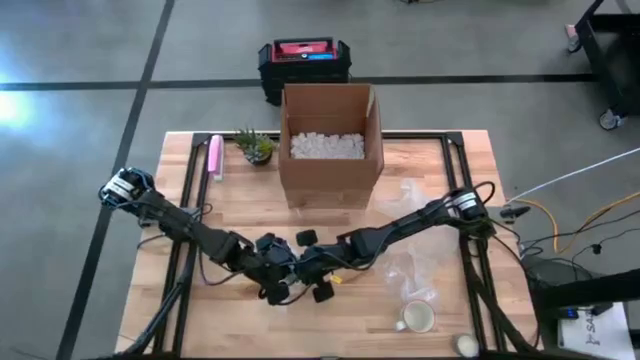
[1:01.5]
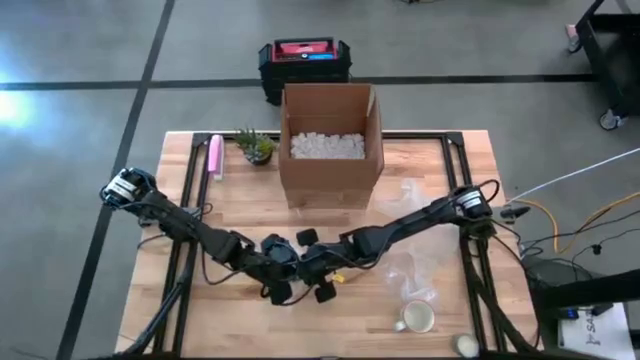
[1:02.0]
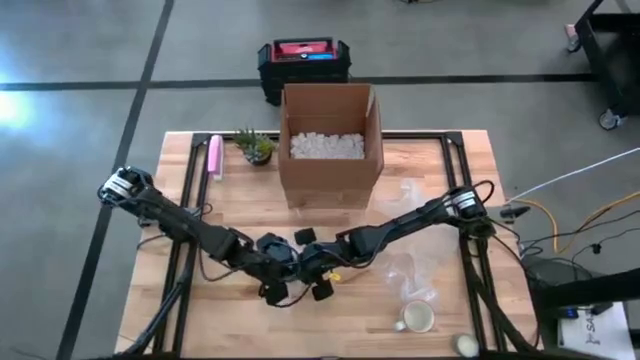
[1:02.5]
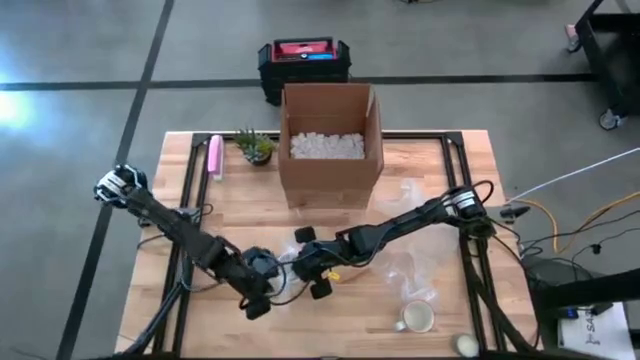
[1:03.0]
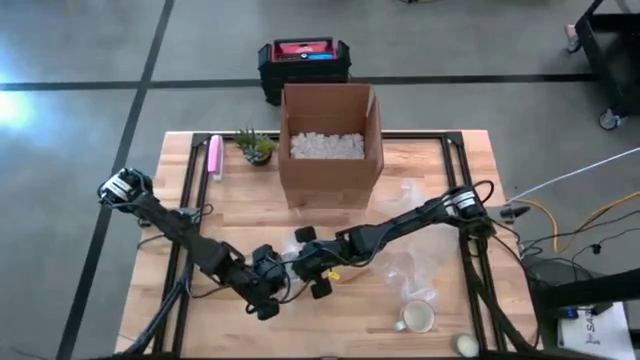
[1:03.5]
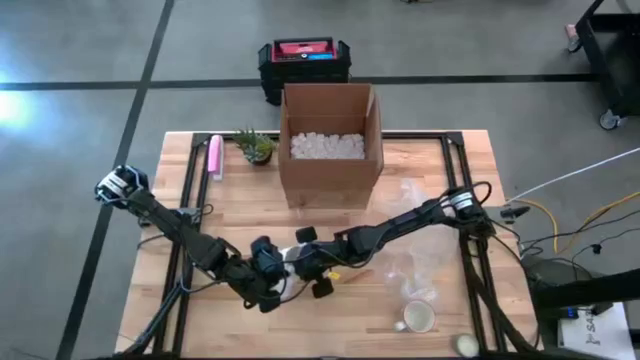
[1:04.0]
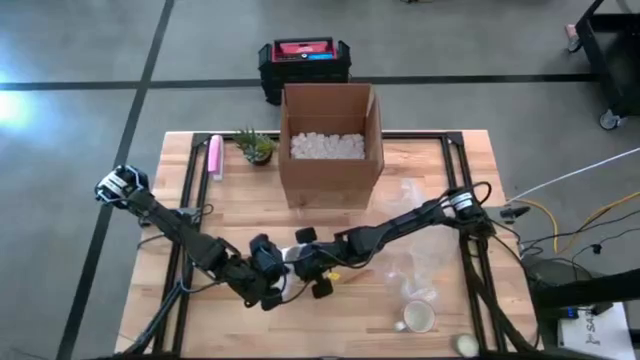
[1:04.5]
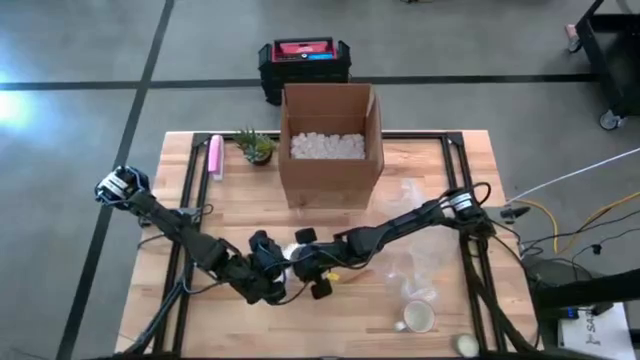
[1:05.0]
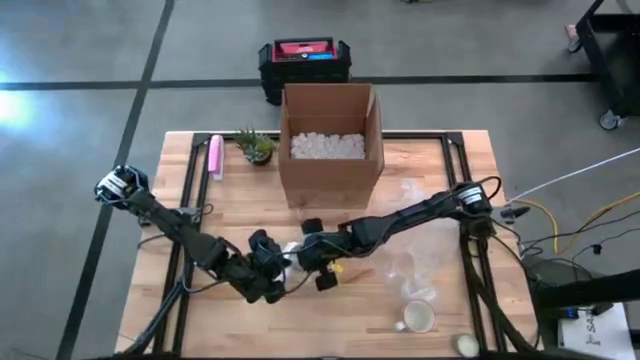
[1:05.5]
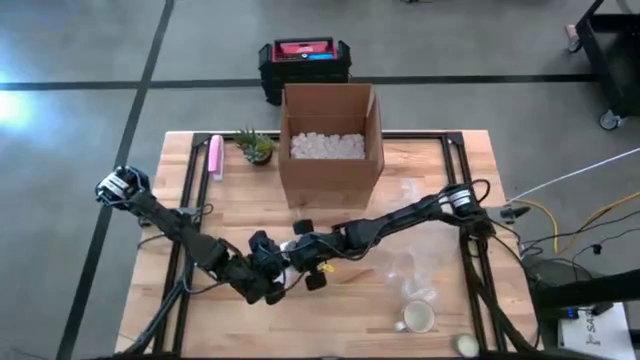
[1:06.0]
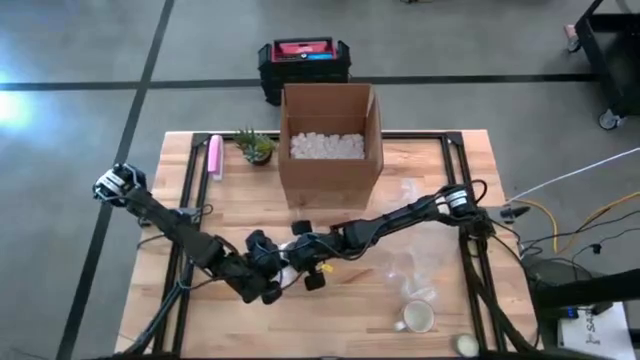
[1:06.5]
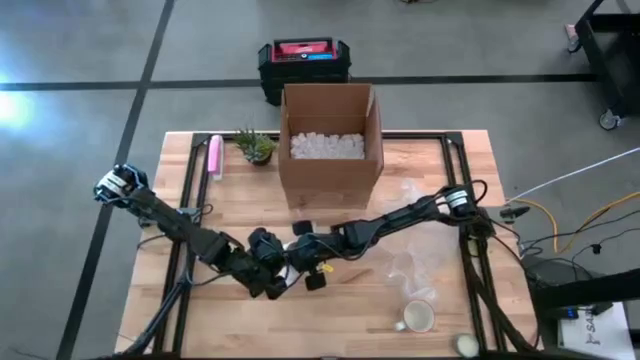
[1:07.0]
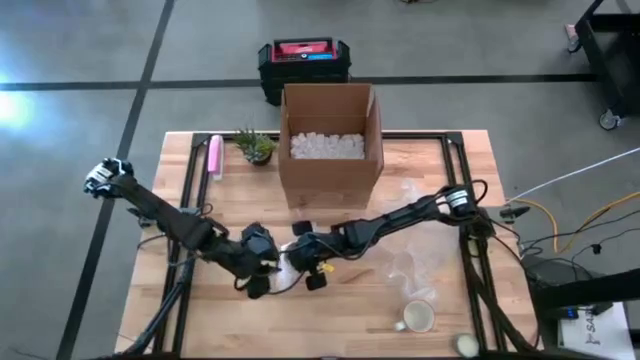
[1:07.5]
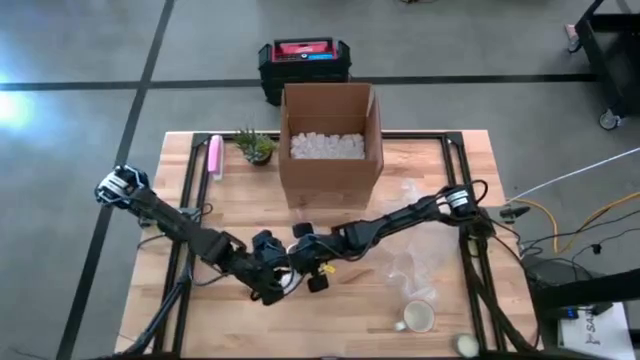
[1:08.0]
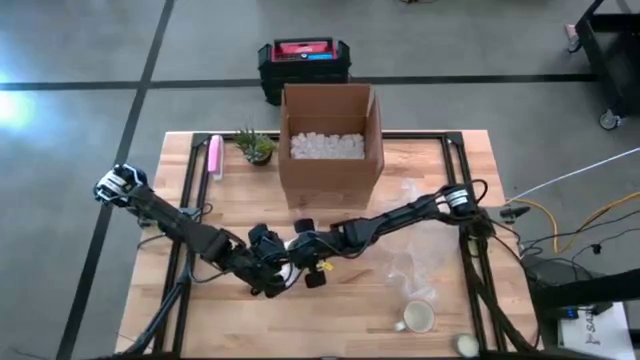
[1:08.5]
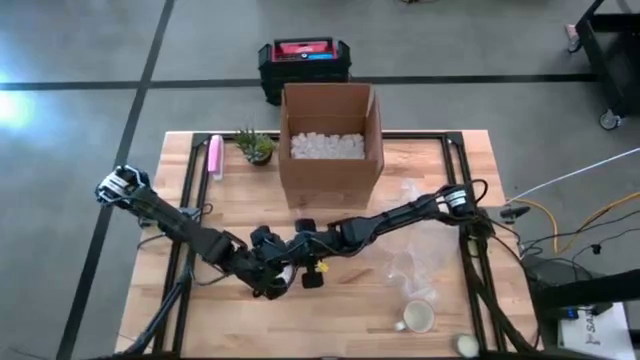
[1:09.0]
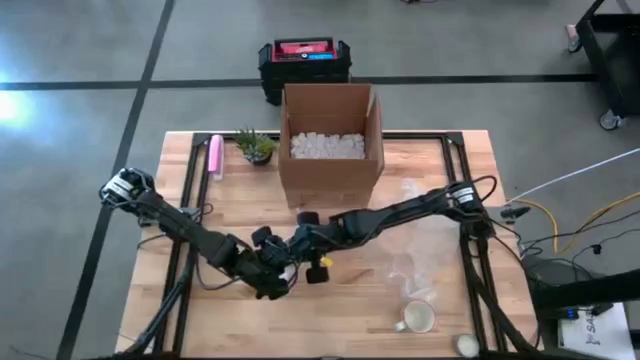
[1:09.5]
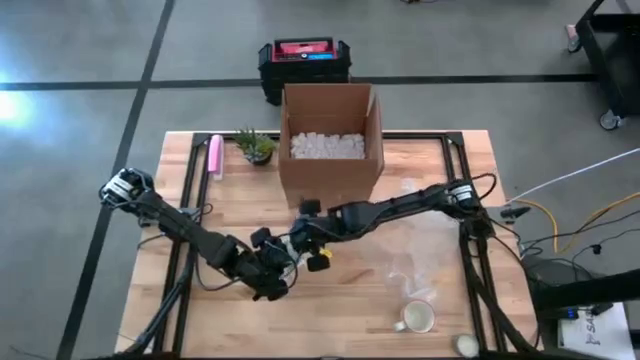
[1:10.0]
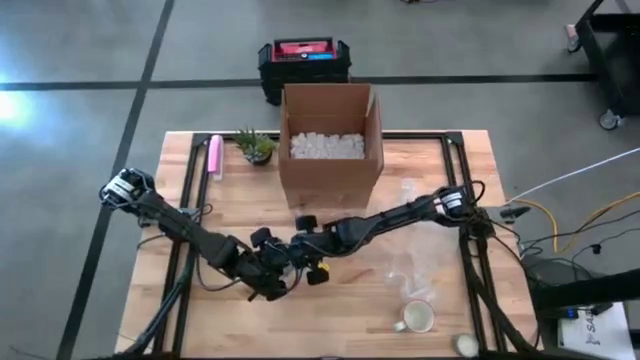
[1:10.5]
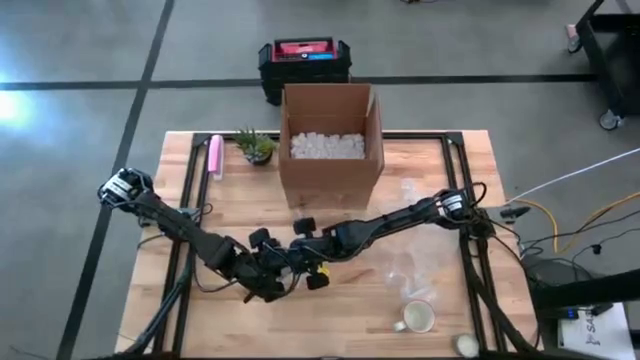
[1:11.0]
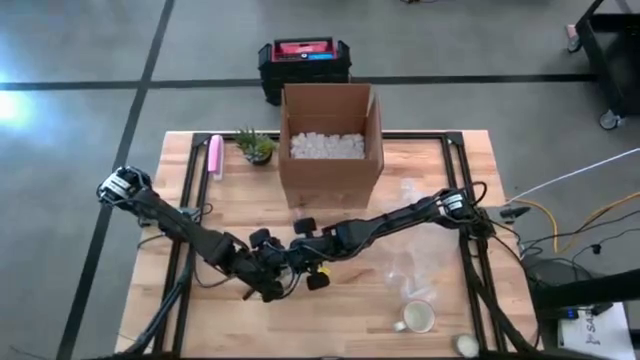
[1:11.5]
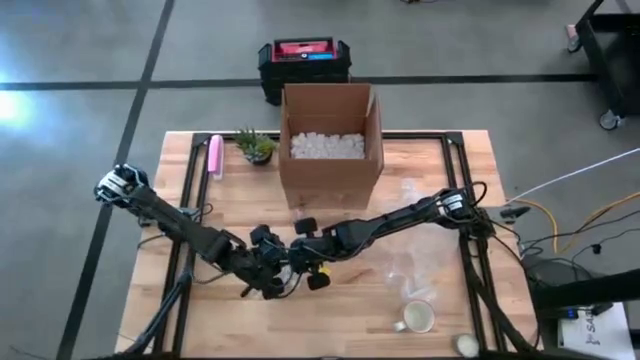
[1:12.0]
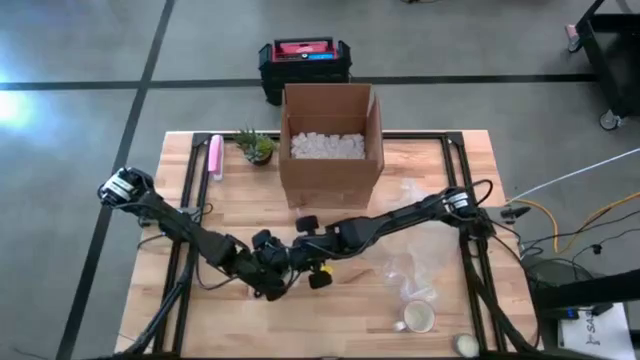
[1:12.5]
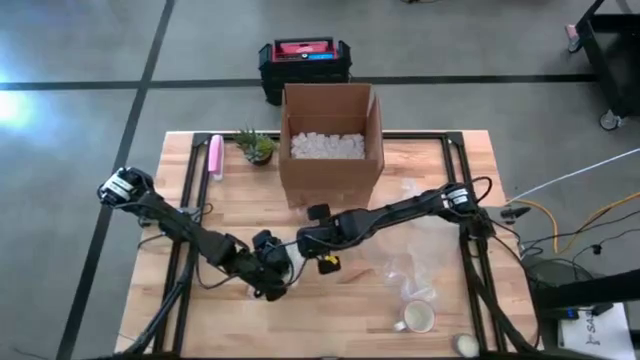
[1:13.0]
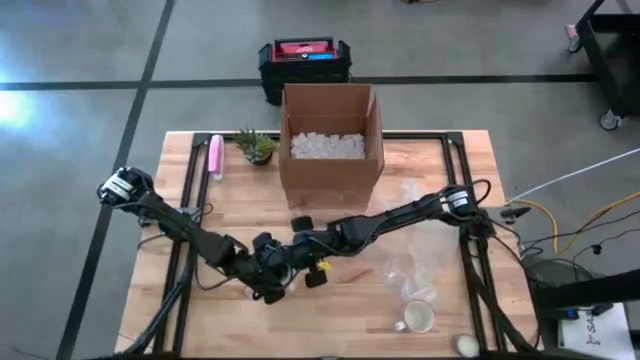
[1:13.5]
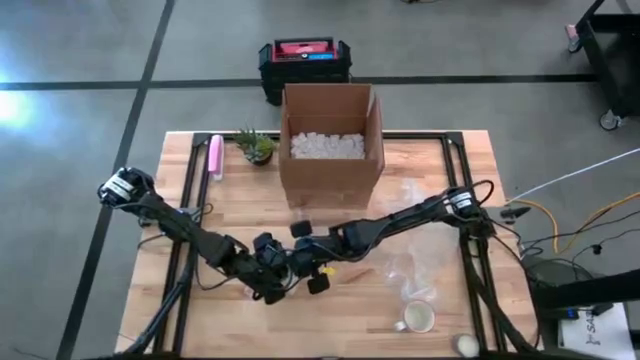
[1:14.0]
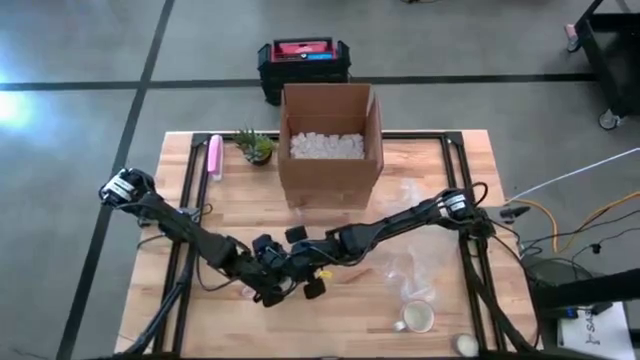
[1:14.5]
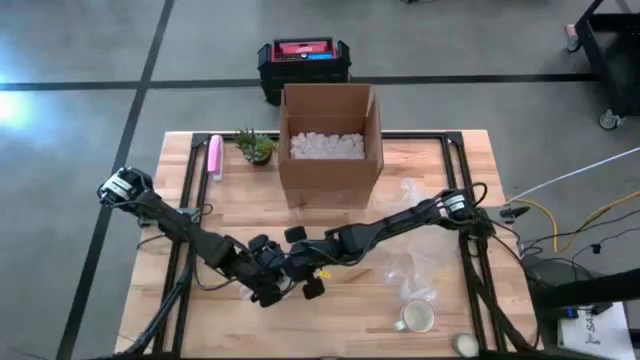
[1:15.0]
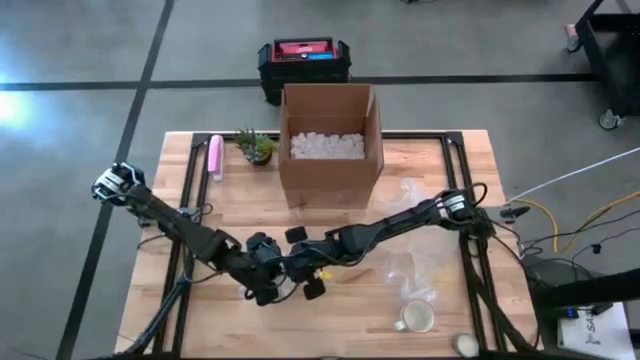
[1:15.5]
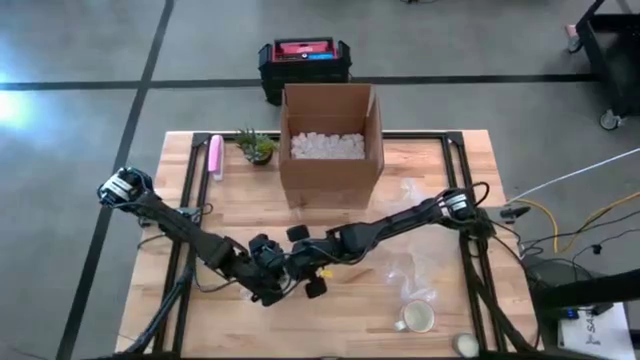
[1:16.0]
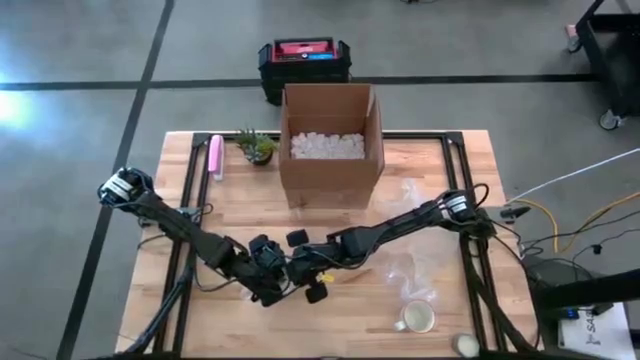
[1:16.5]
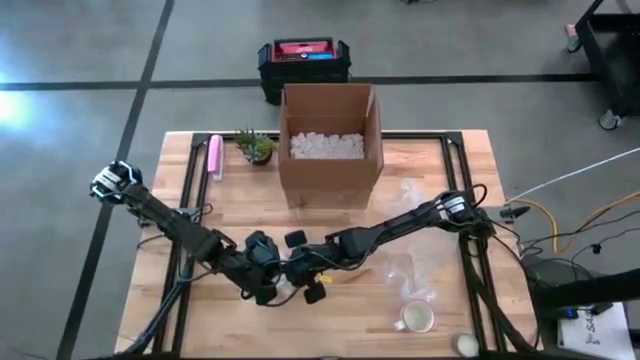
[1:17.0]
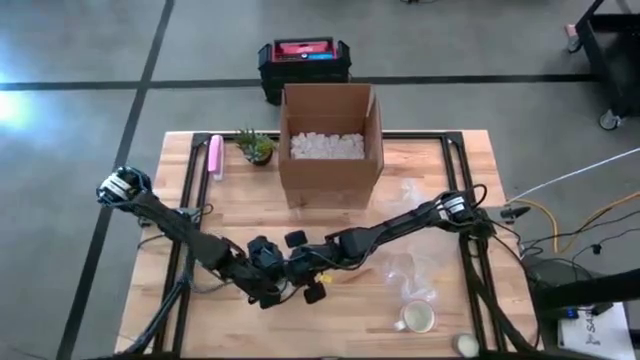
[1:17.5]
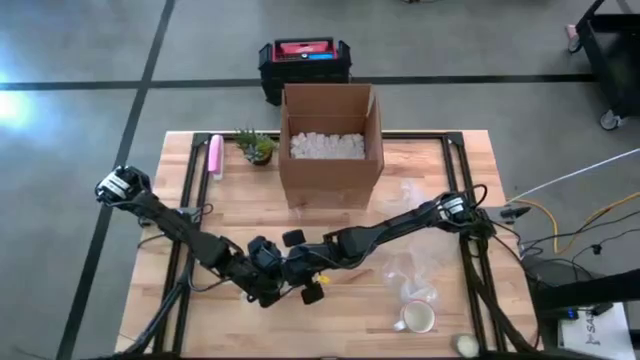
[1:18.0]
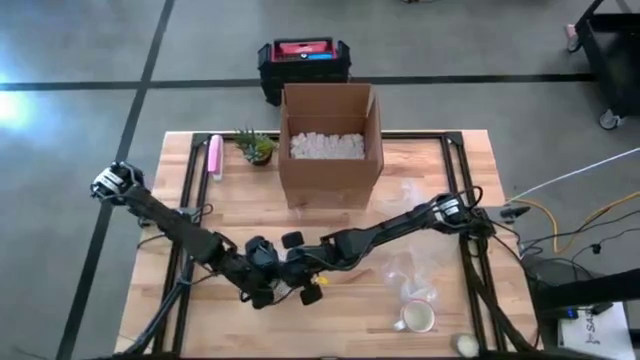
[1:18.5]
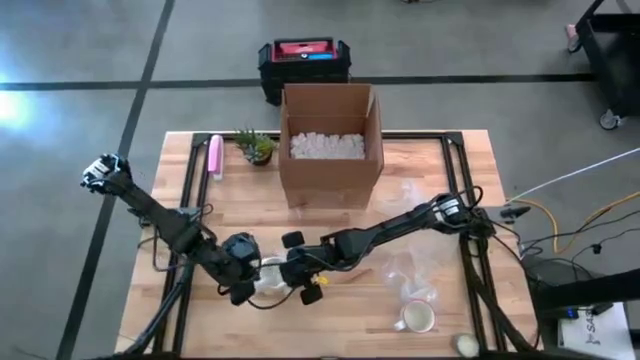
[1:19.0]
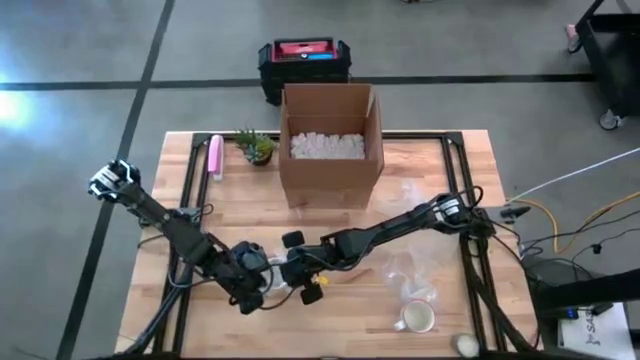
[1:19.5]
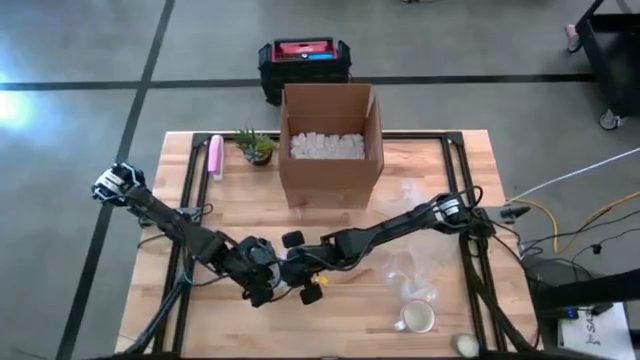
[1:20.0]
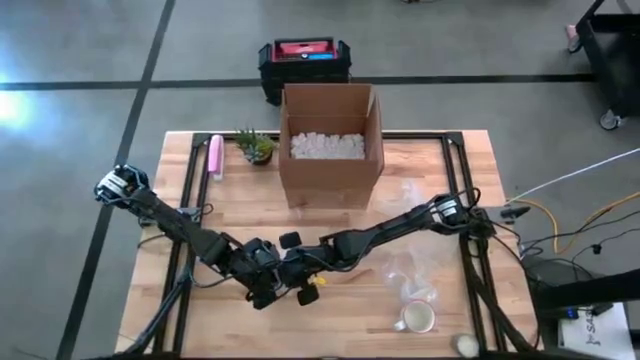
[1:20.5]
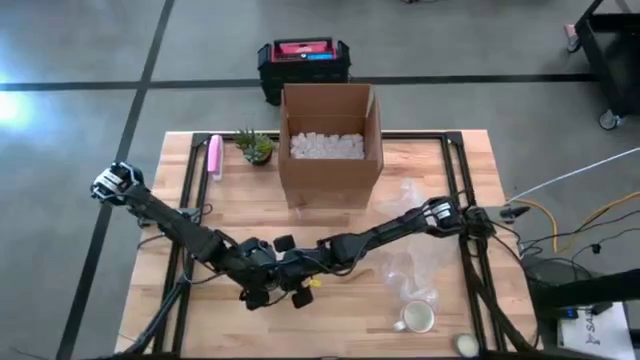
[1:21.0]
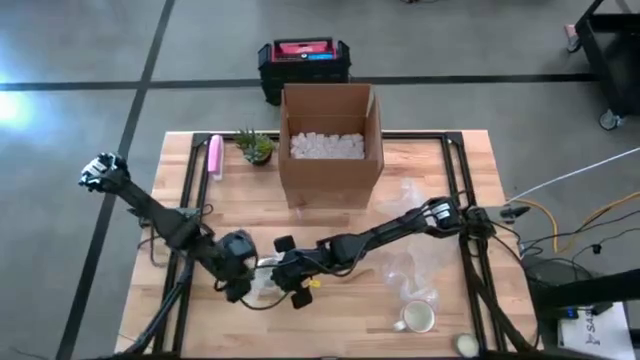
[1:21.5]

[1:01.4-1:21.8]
Task: wrap mug
Wrap the orange mug with the bubble wrap
